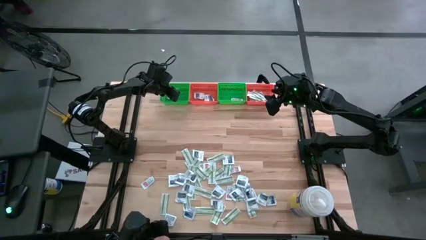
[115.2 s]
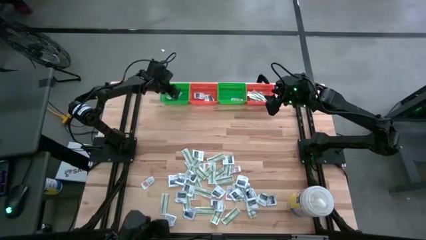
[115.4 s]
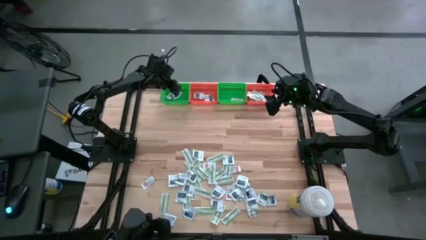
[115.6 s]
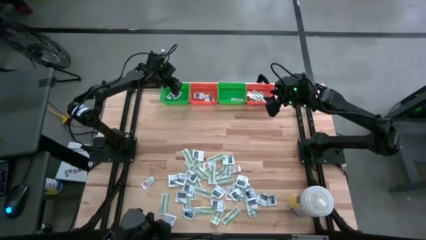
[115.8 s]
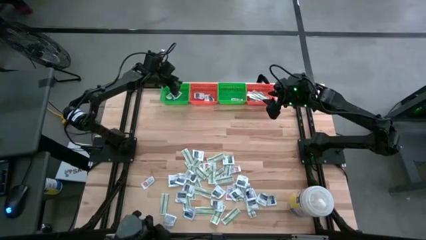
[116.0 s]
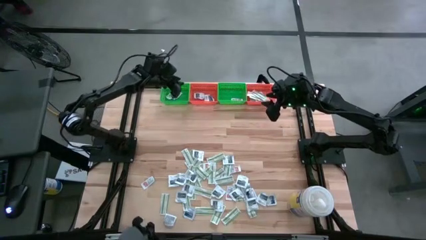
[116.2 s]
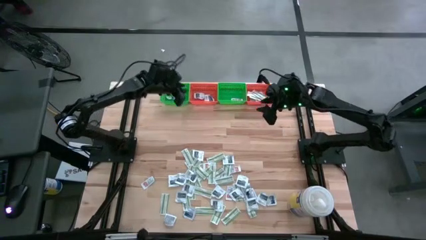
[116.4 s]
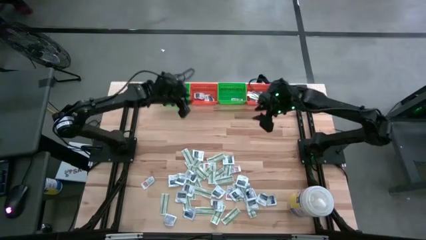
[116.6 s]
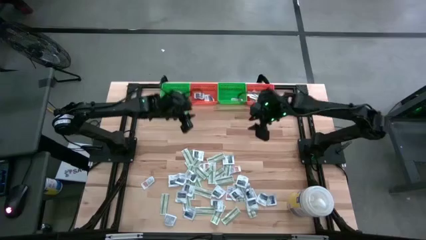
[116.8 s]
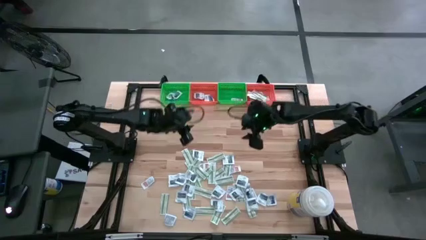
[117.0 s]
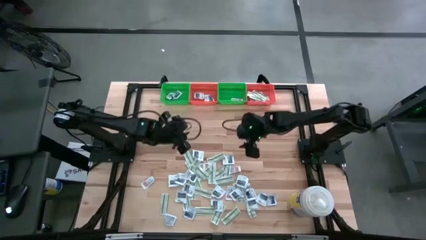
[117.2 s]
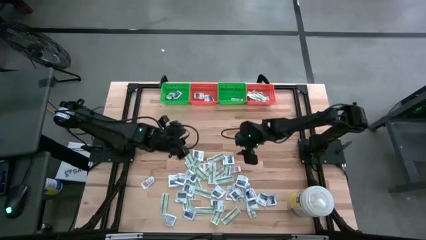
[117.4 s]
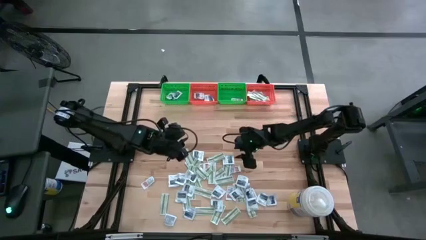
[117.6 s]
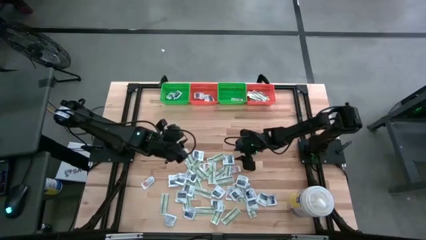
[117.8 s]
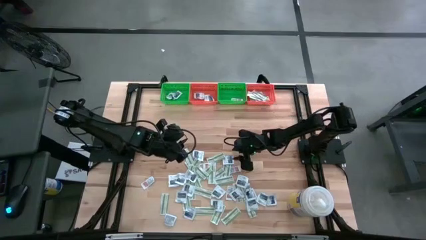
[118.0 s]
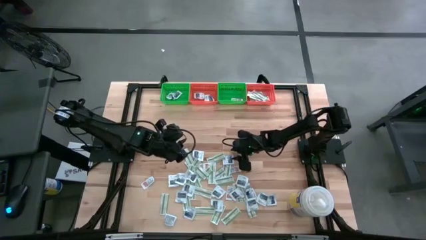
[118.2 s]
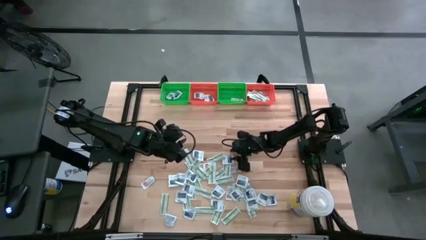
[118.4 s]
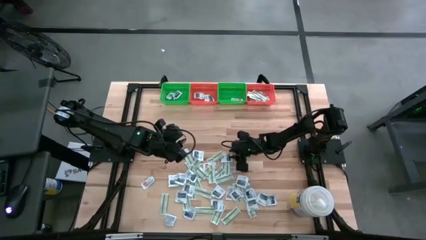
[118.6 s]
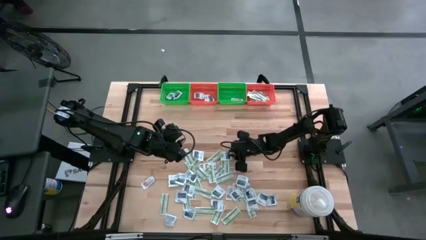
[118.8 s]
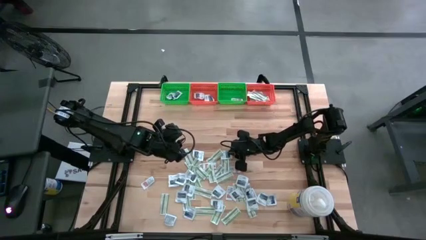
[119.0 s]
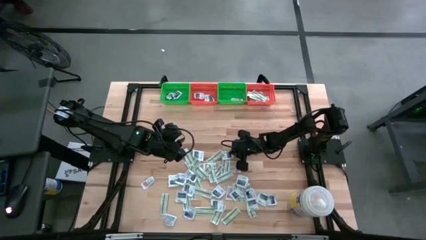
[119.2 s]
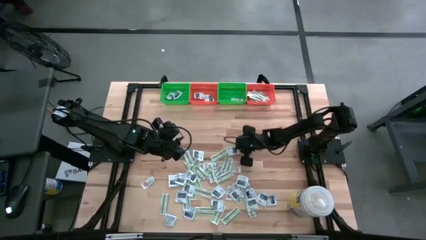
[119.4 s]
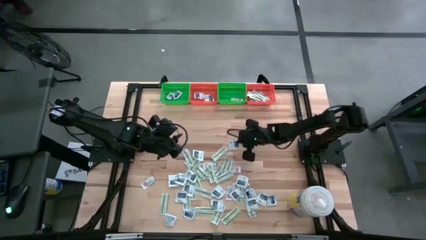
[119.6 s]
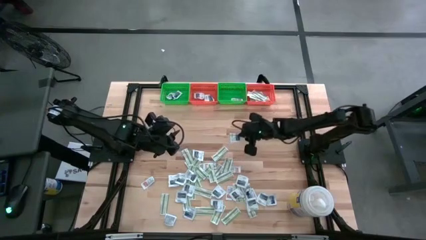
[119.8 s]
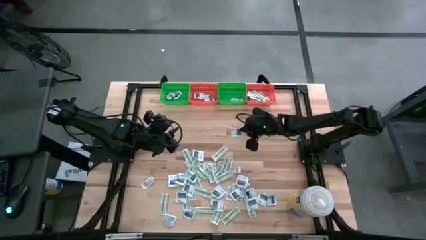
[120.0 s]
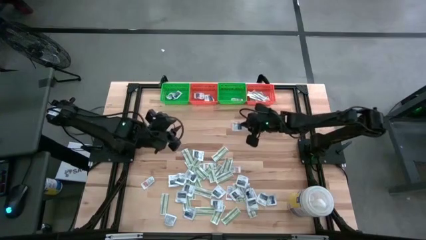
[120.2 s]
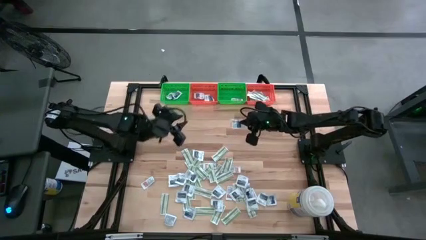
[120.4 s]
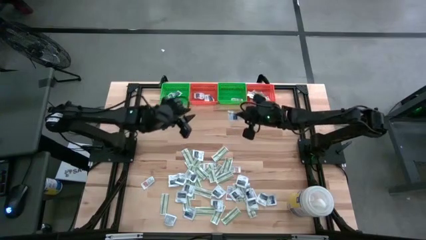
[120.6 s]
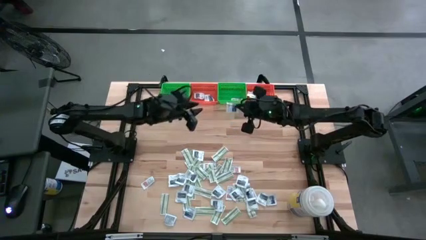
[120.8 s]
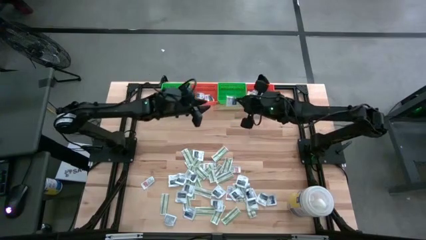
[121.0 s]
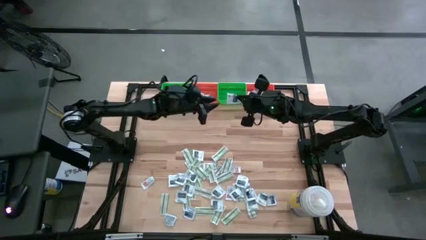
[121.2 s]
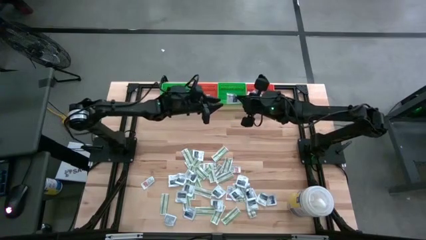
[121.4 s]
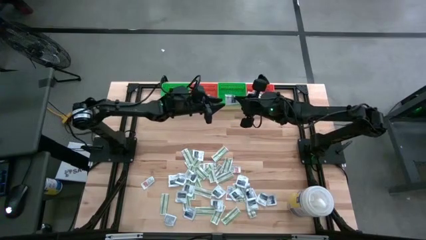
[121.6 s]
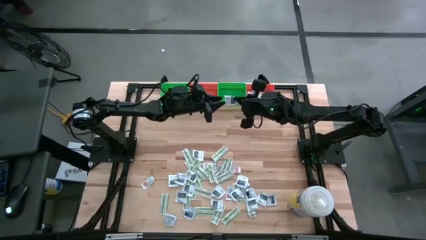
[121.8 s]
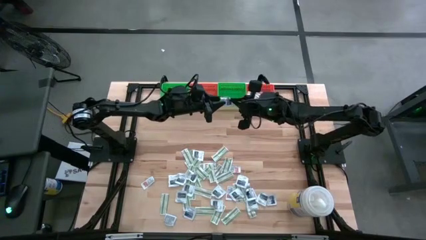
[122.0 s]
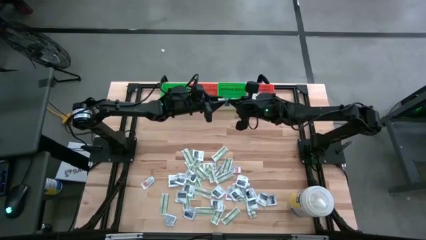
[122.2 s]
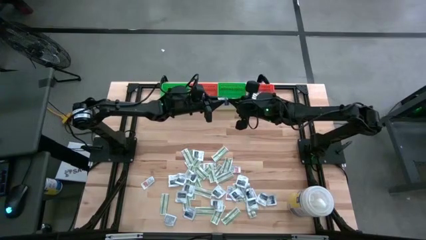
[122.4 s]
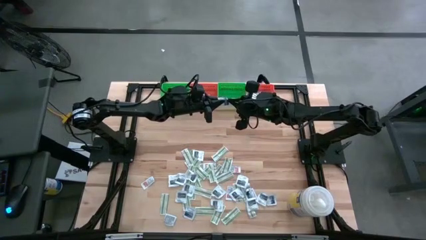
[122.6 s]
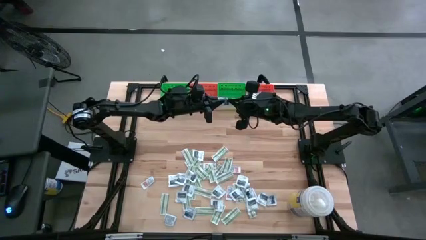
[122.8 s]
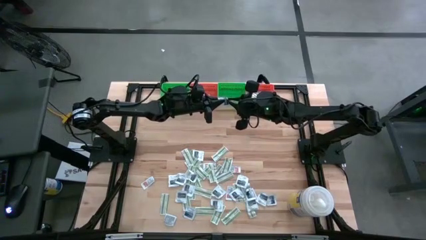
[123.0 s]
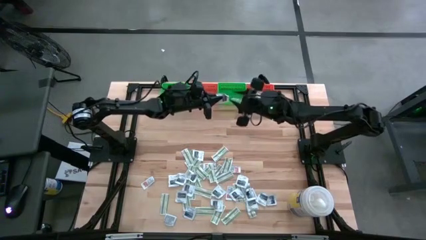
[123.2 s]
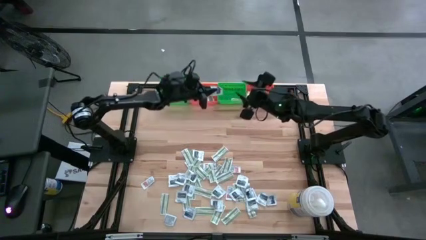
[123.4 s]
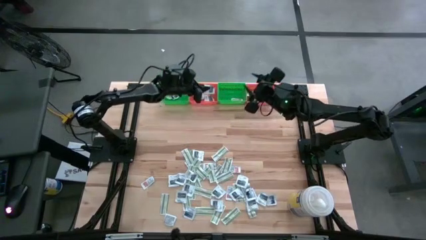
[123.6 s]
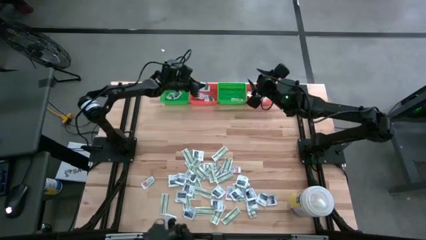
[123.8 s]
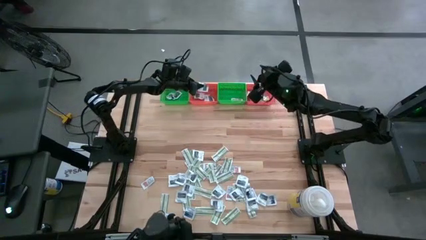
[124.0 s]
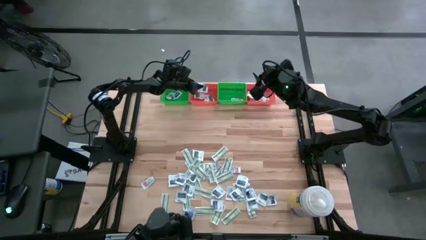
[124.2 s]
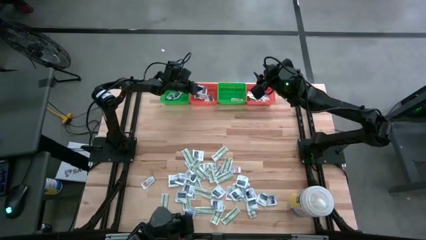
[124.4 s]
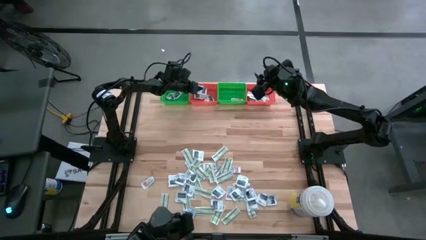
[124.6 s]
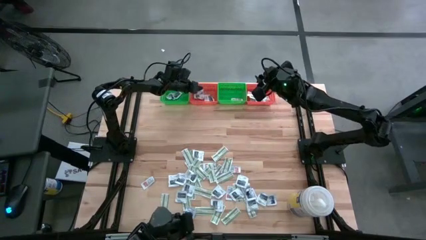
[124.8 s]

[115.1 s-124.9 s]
Task: Pick & Place First Aid Supplies
Put the gray towelette pack in the left orange bin

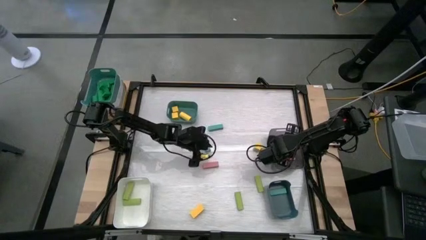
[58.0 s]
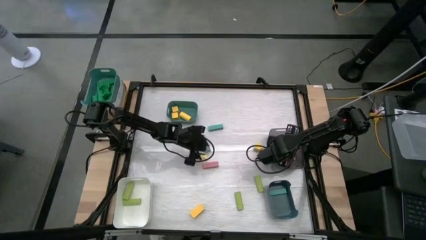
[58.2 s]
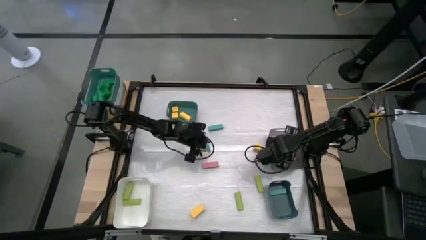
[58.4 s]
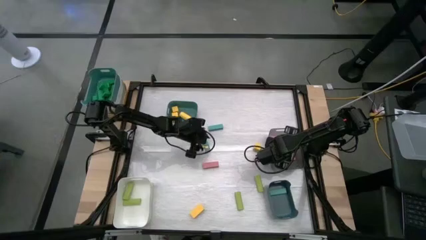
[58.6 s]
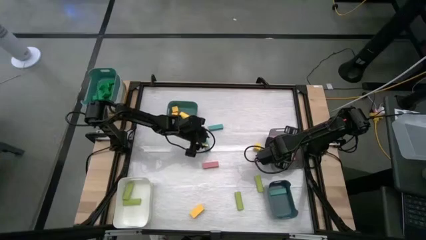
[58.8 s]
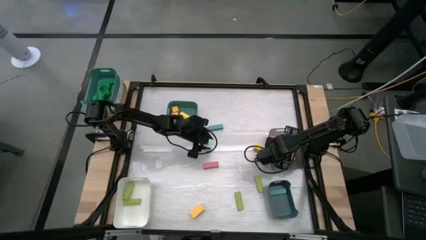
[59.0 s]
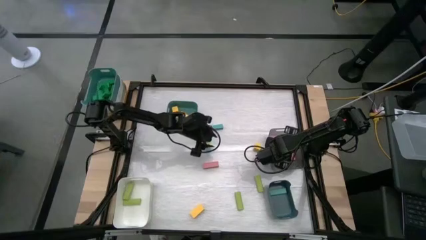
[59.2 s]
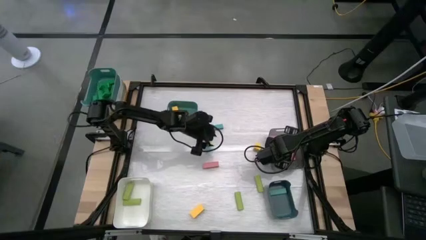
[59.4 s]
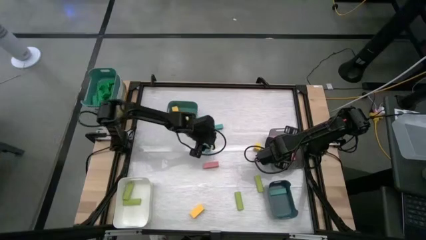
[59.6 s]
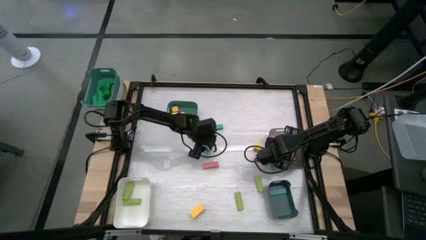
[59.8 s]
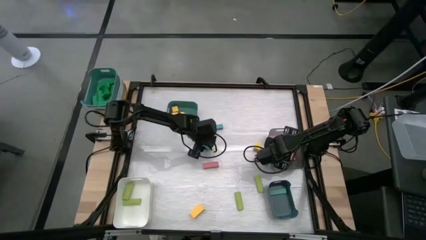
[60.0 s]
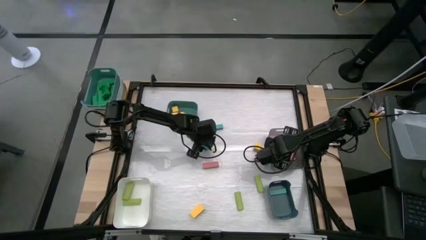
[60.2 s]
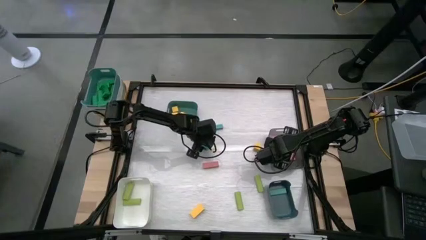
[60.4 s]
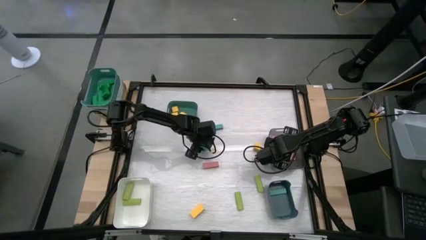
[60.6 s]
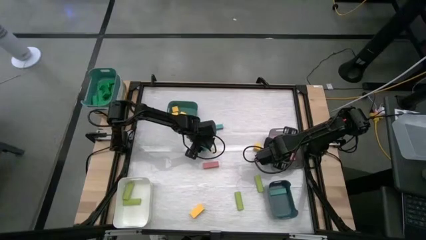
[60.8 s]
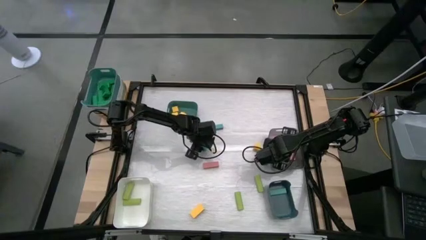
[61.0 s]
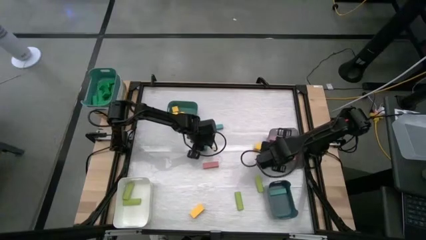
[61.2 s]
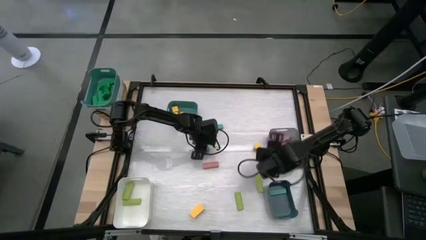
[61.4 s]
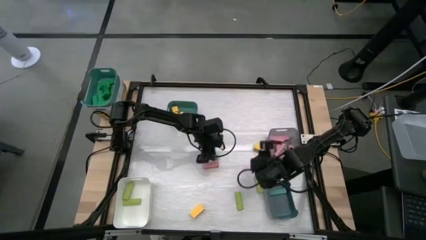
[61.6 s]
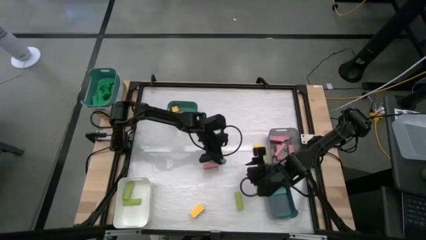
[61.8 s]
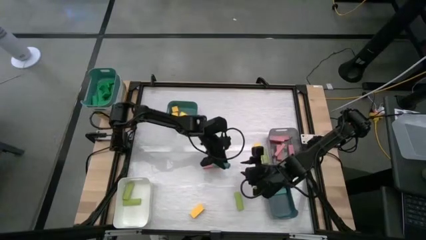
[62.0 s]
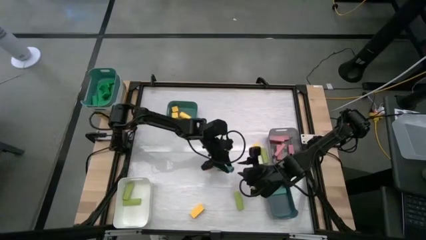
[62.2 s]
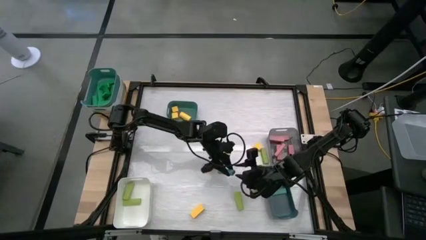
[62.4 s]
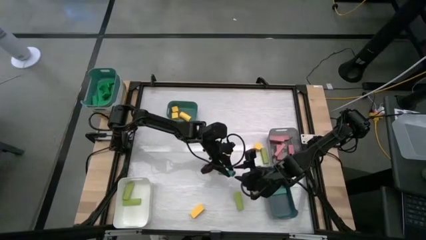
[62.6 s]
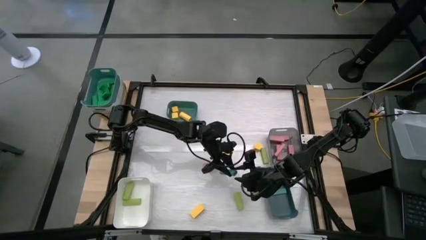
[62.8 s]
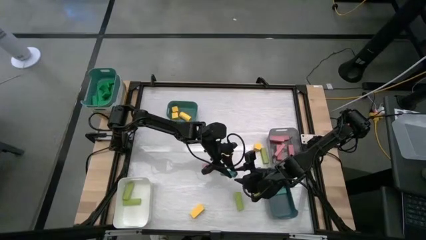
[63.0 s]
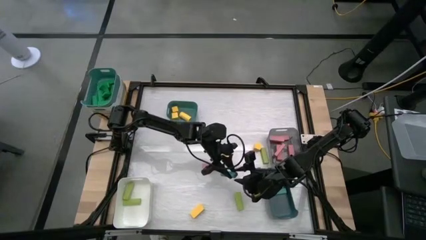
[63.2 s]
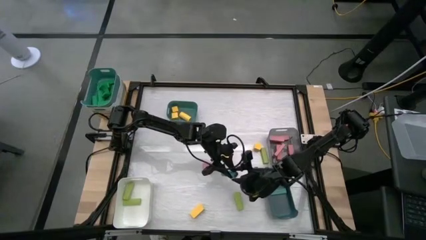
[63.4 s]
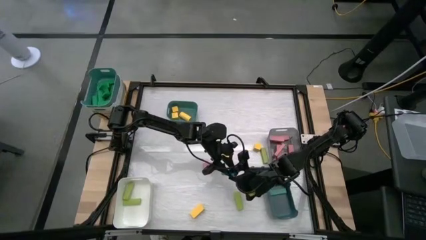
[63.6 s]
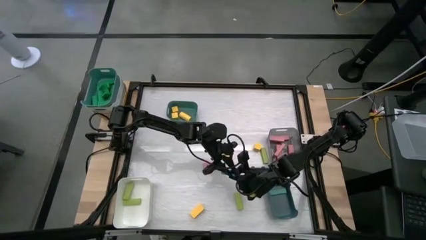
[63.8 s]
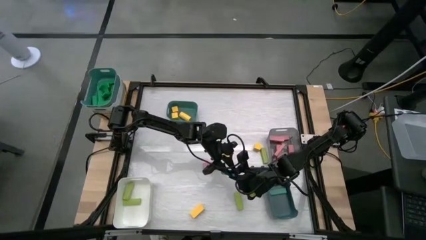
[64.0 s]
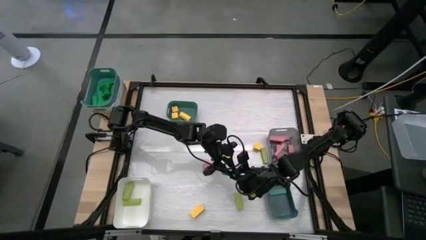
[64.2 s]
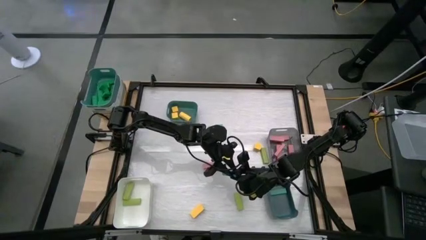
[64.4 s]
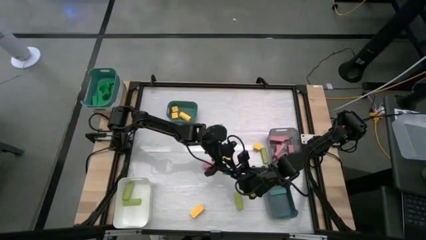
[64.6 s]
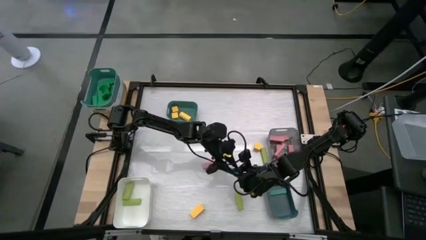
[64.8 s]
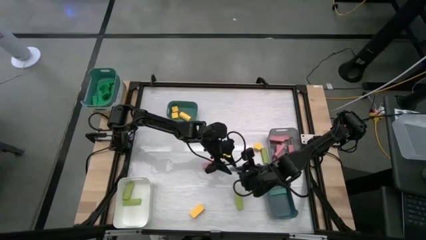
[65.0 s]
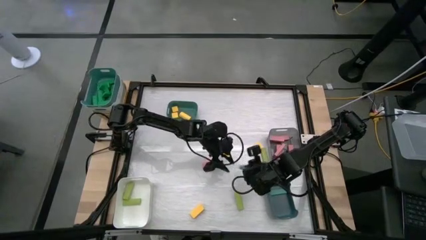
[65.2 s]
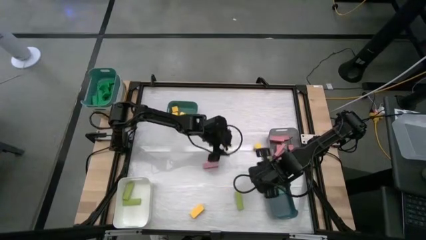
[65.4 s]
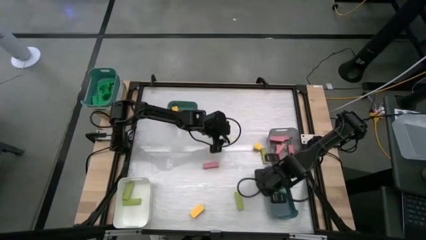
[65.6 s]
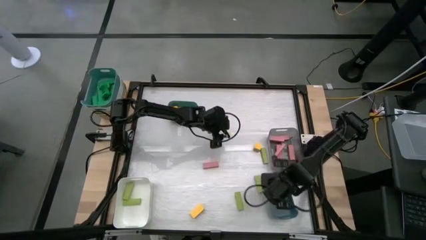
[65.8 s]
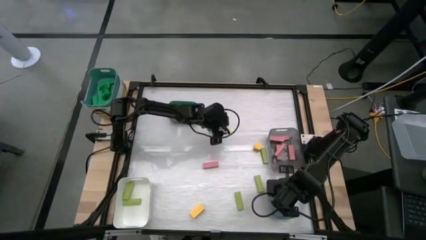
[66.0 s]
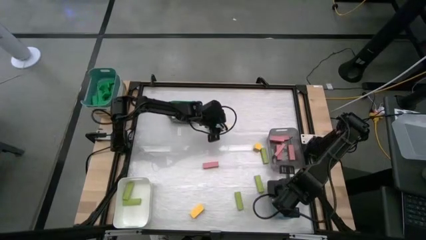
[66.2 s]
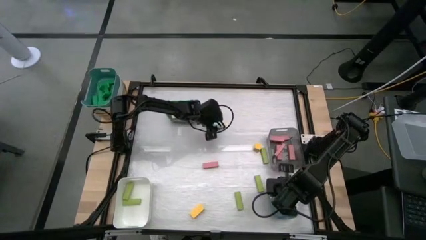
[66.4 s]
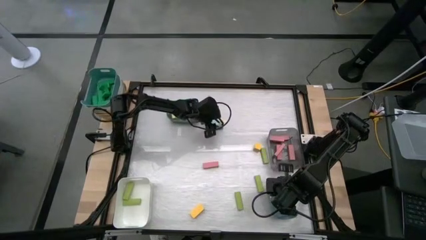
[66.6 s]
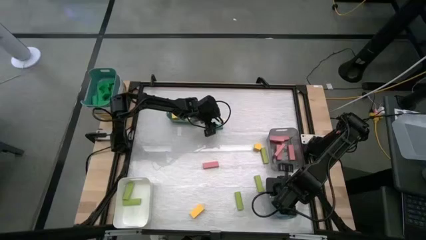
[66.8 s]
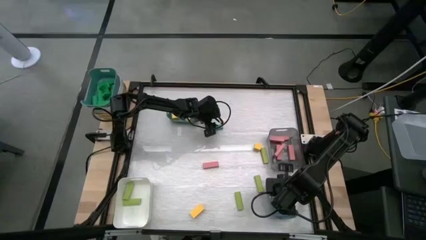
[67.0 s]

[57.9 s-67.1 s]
Task: Sort blocks
Put the blue block into the blue bin
